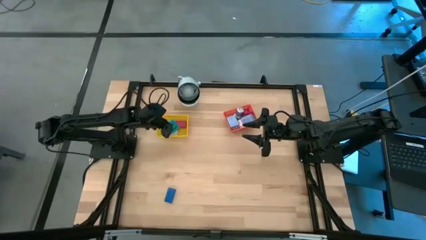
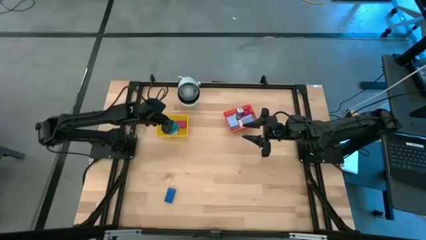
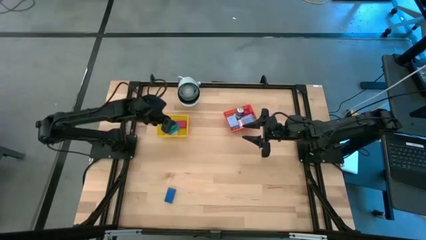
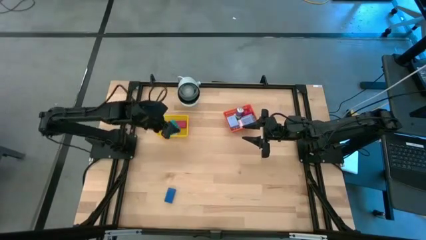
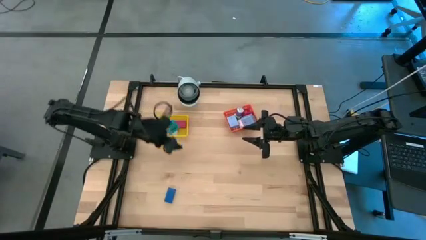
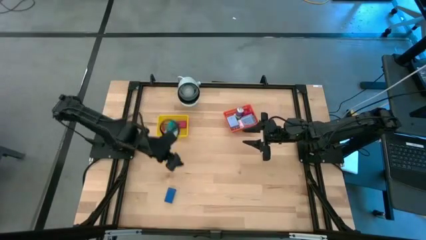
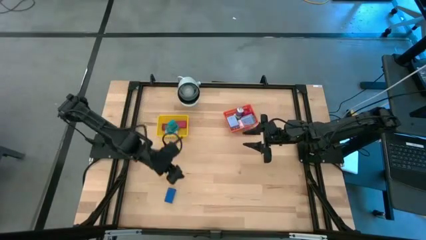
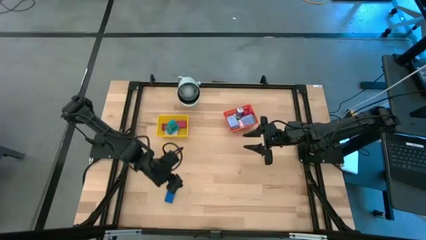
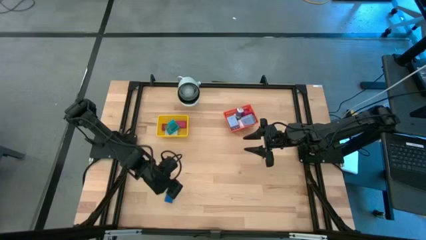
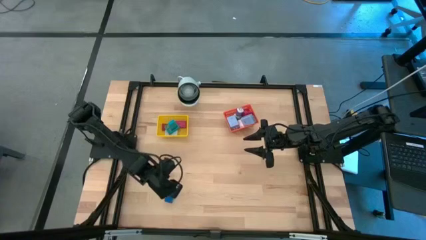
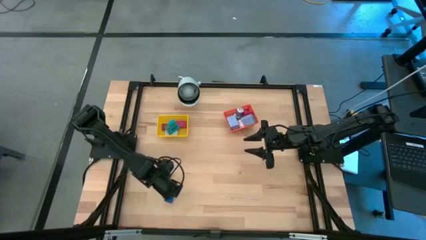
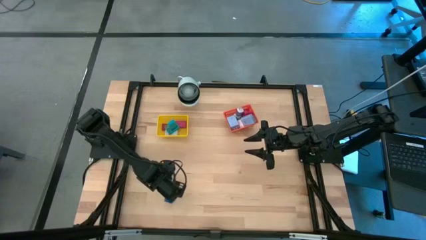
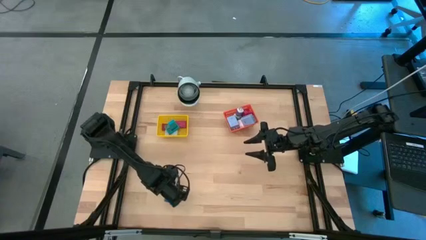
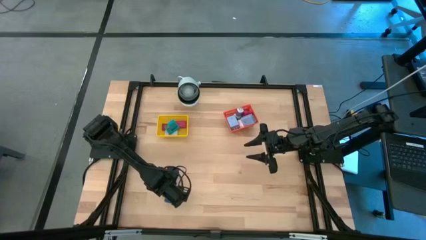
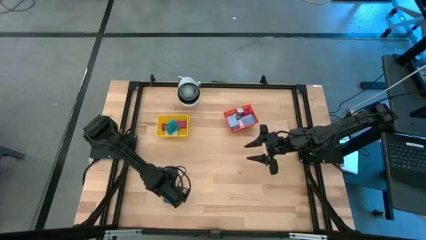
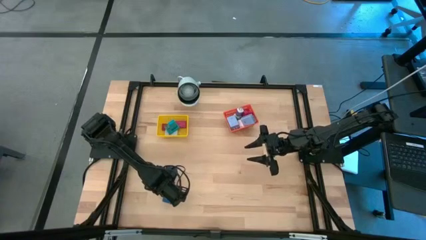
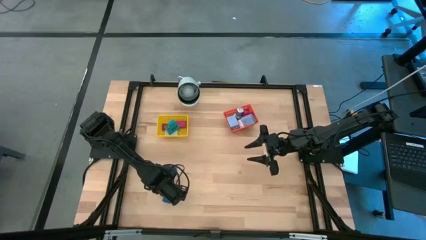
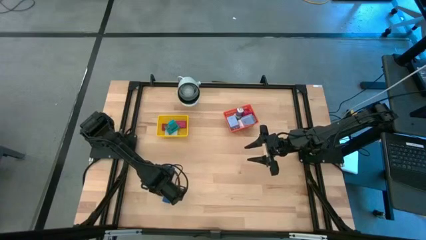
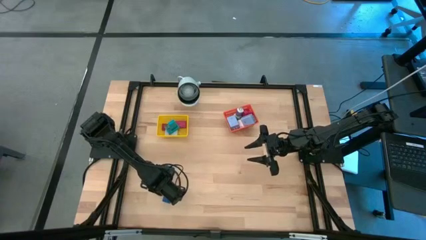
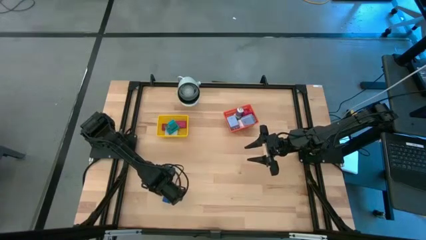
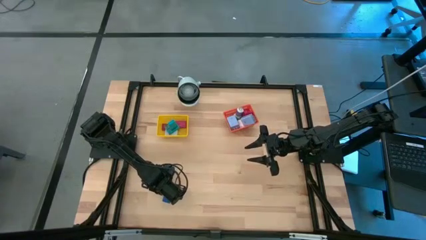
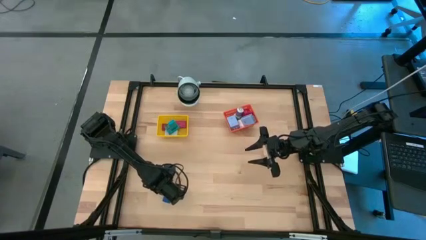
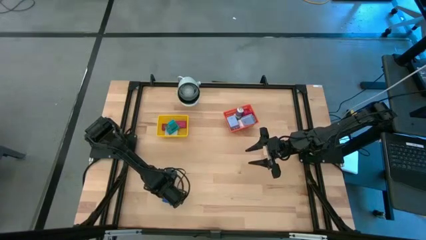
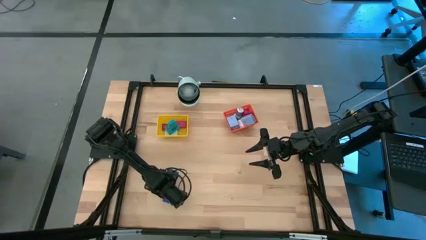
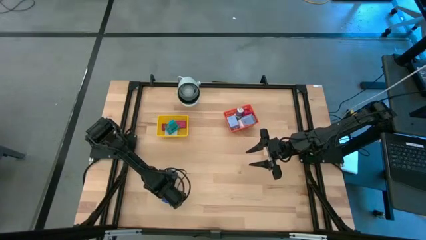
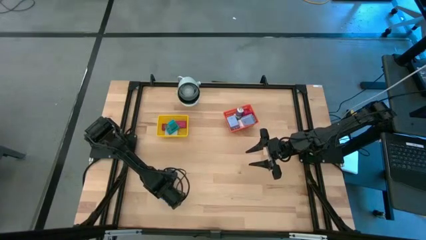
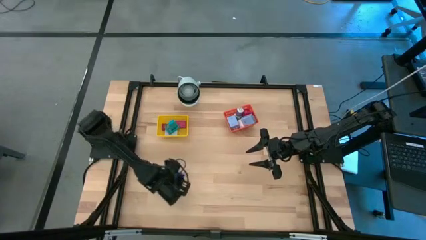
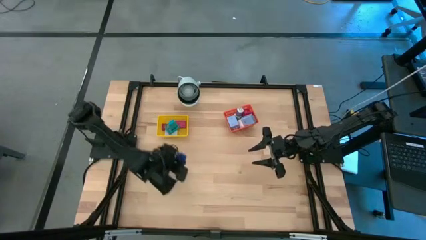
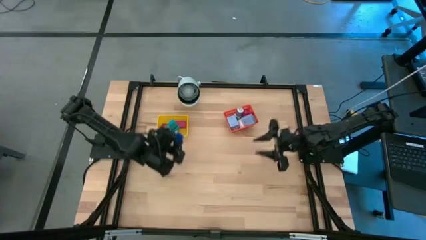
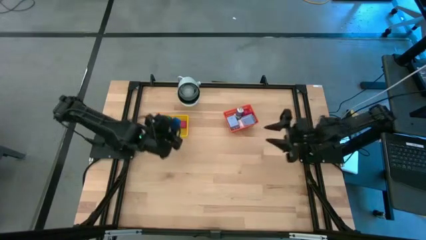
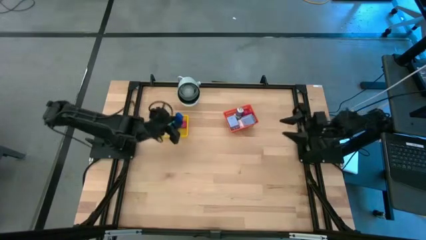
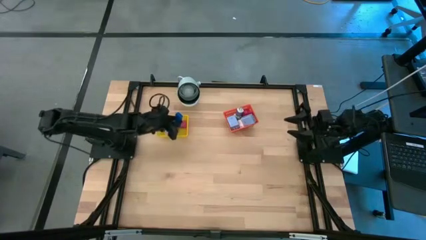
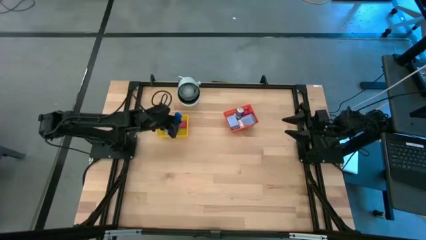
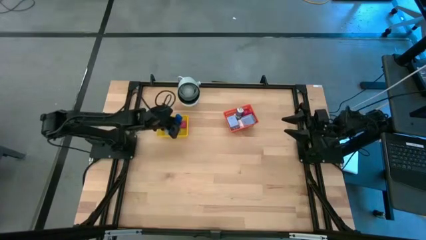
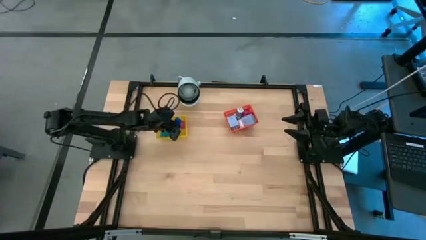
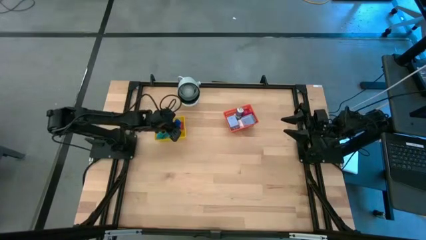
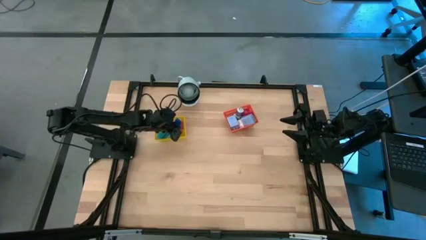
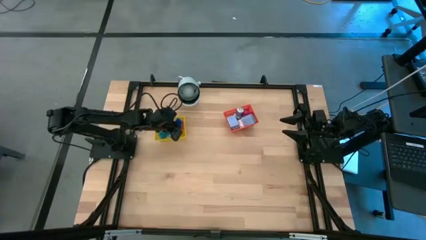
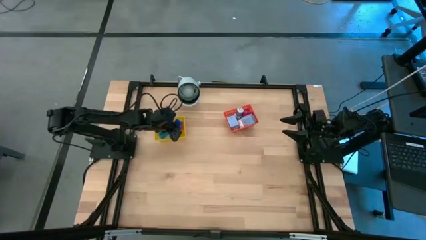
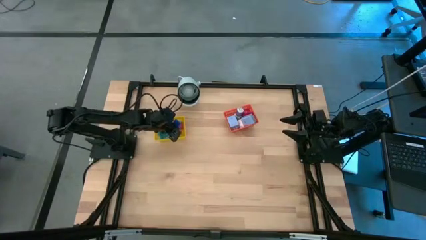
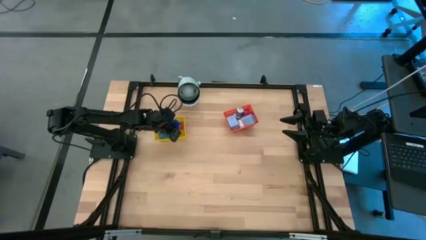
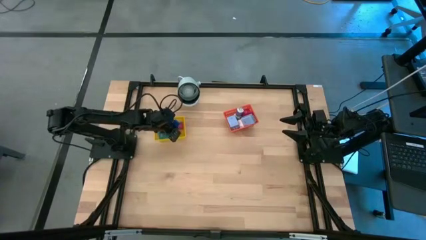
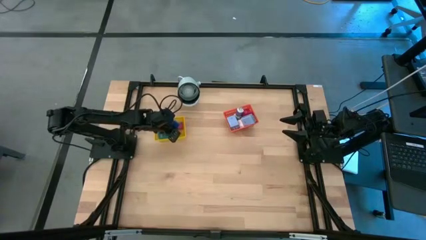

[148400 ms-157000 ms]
Task: Pick & Place Office items
Put the blue digital timer into the yellow bin

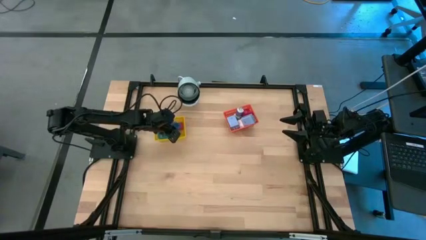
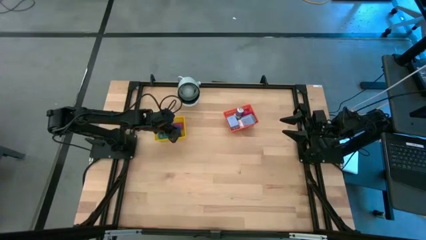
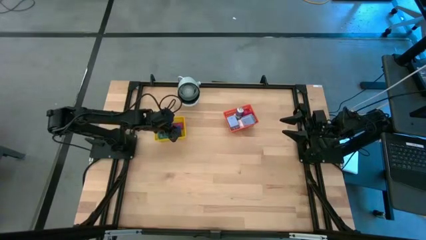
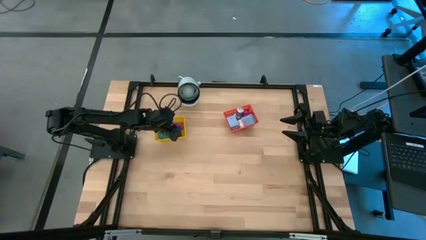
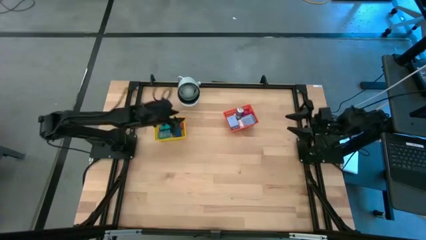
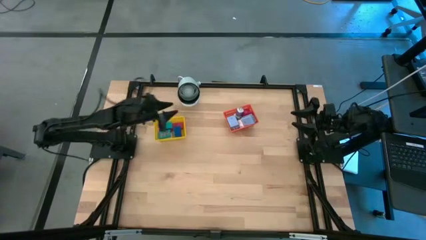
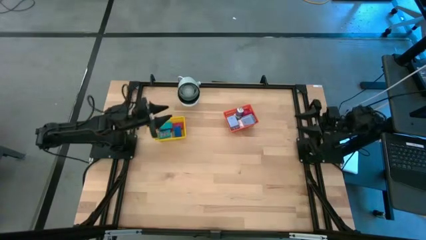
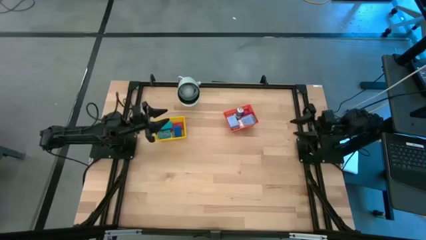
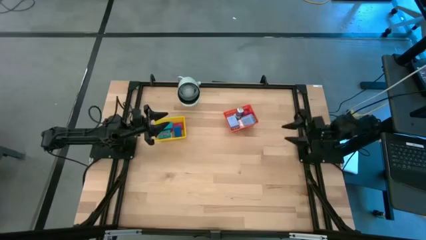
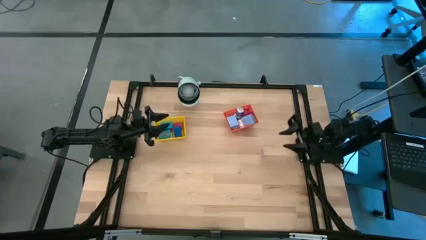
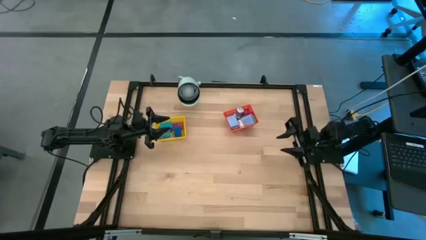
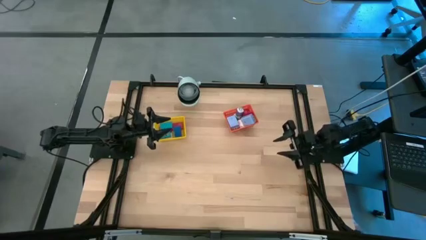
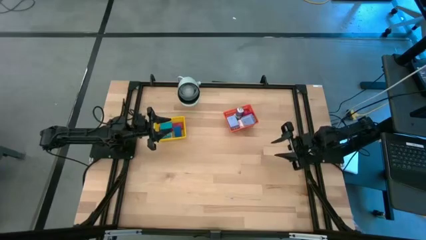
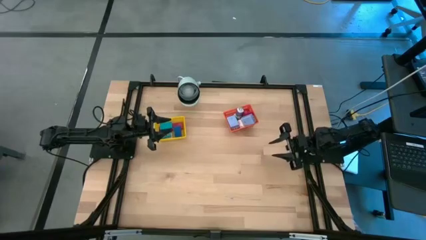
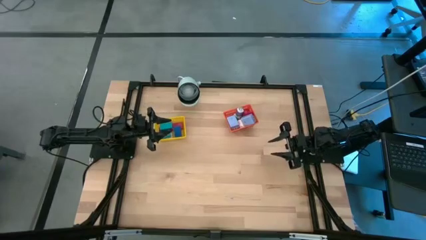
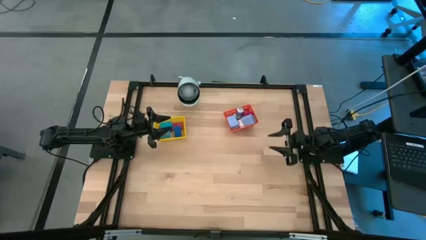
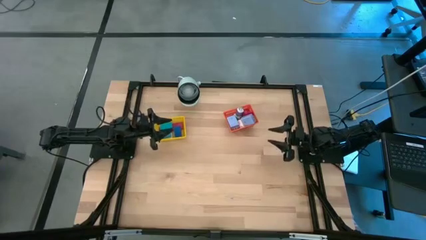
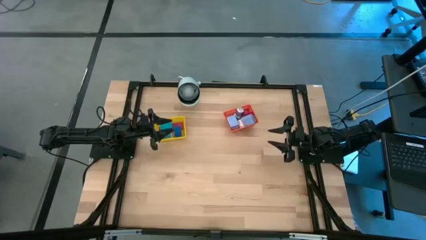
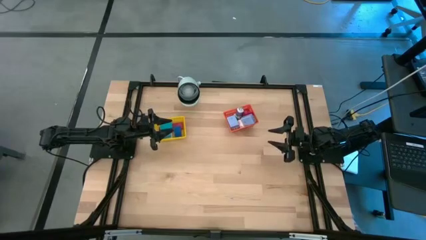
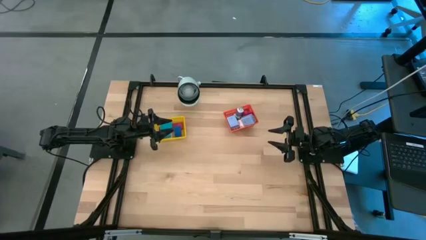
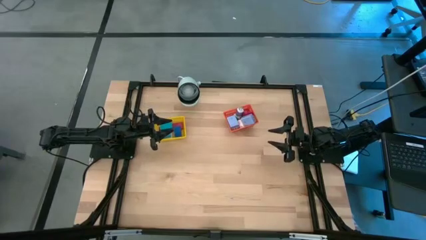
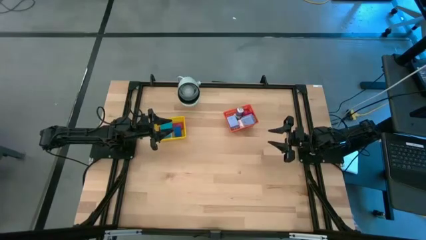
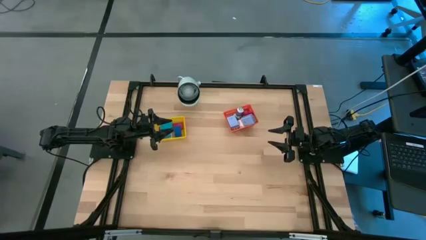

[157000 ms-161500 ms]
Return to Home Position
